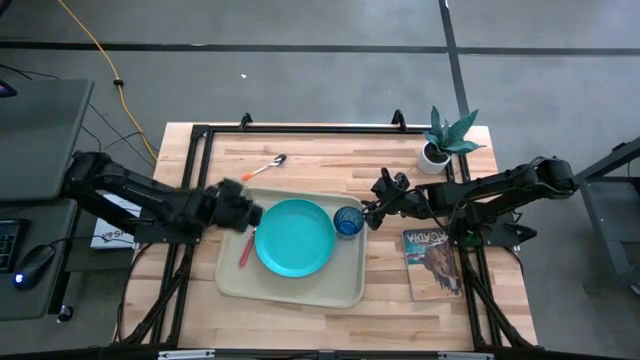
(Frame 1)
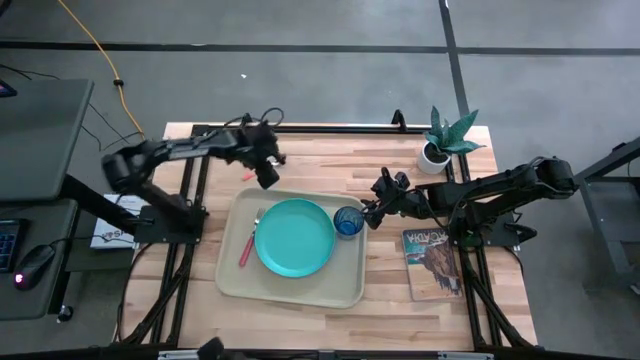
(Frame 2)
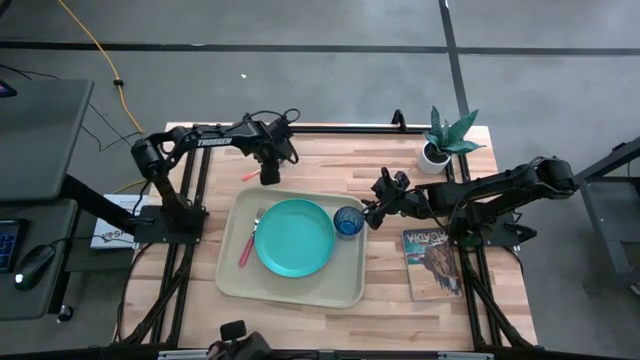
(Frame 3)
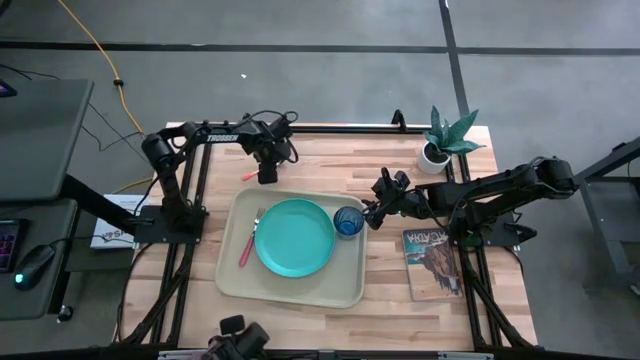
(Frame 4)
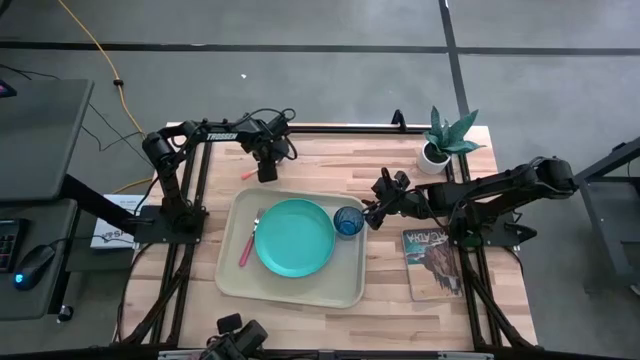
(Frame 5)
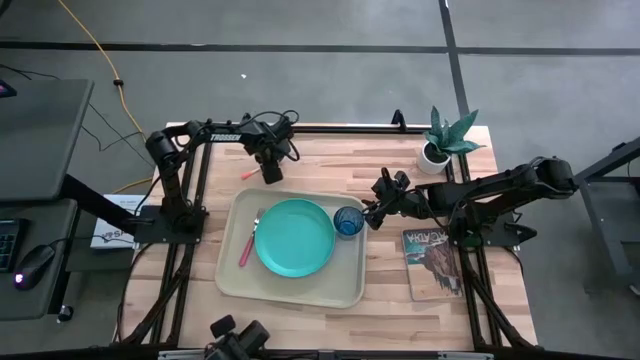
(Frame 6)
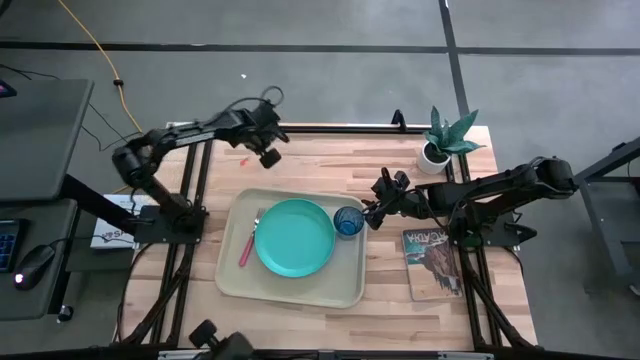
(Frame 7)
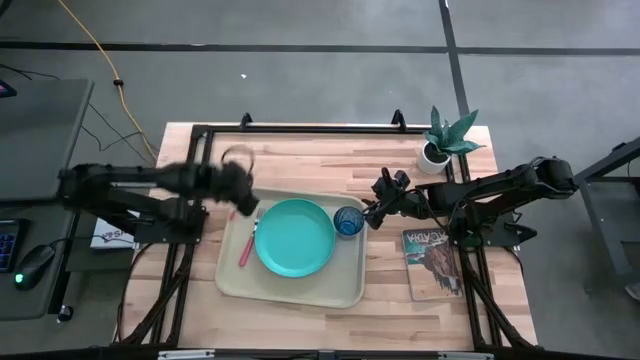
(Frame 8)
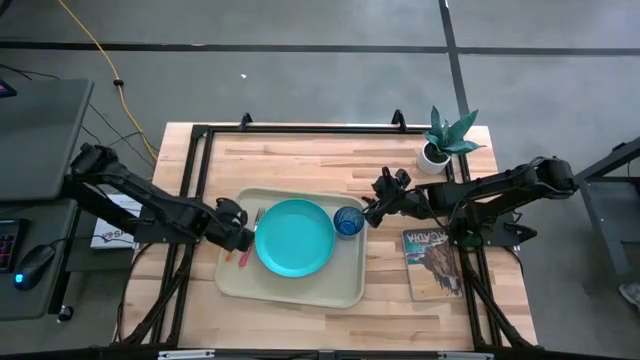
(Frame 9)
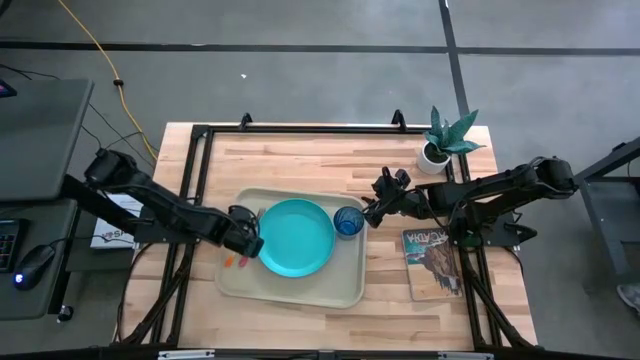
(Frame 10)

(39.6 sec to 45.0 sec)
Task: Pick and place plate/cup/fork/spoon on tray
Put the orange spoon to the left side of the pink fork on the gray serving tray

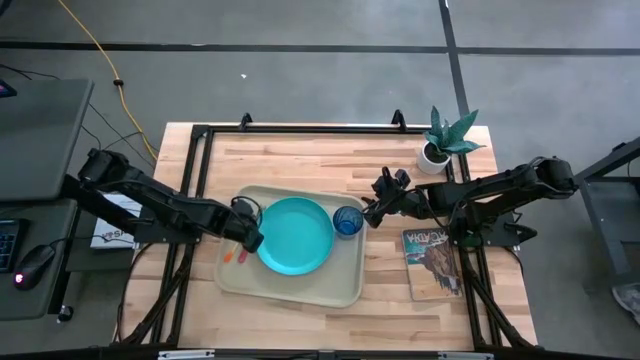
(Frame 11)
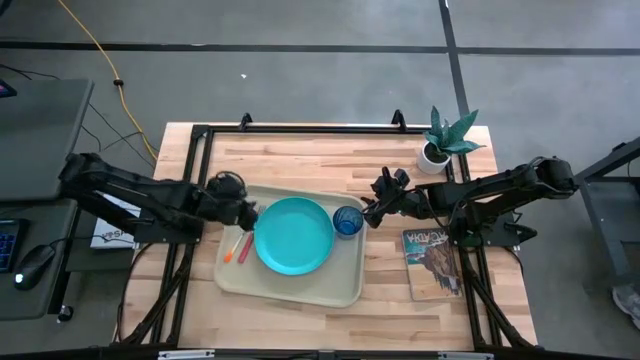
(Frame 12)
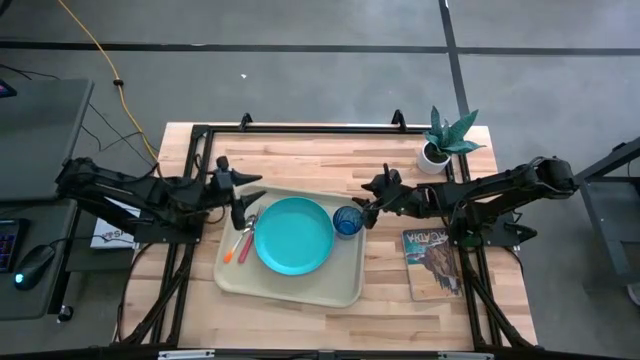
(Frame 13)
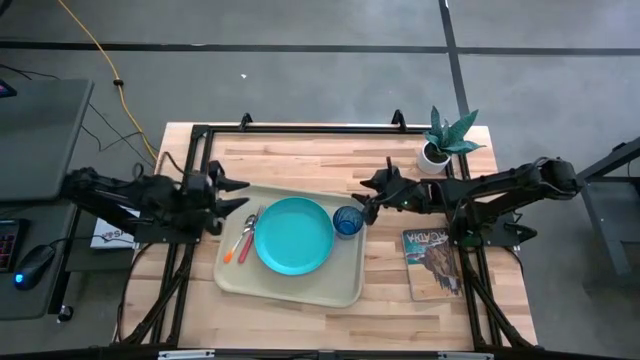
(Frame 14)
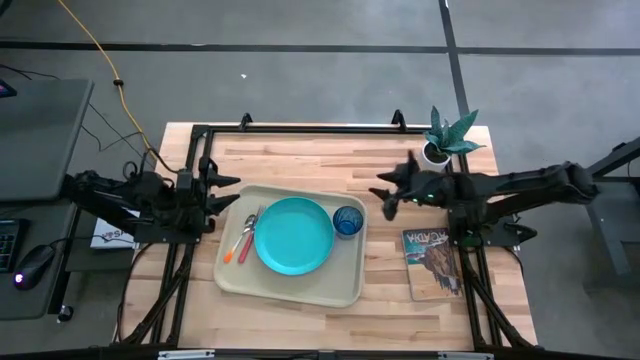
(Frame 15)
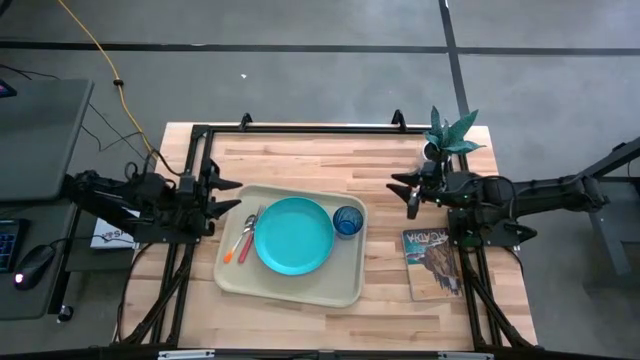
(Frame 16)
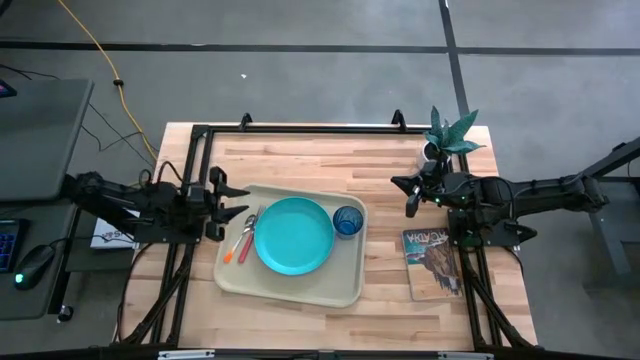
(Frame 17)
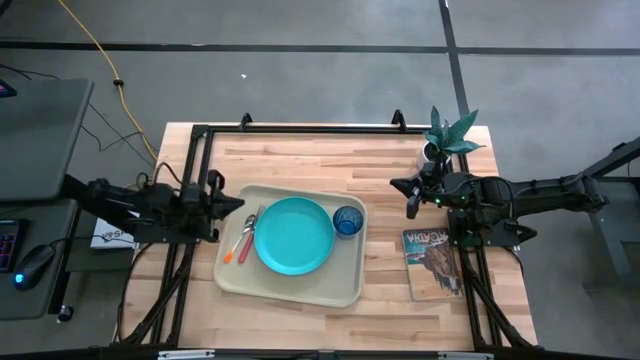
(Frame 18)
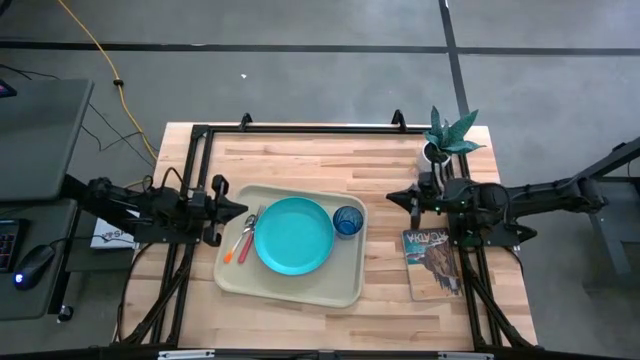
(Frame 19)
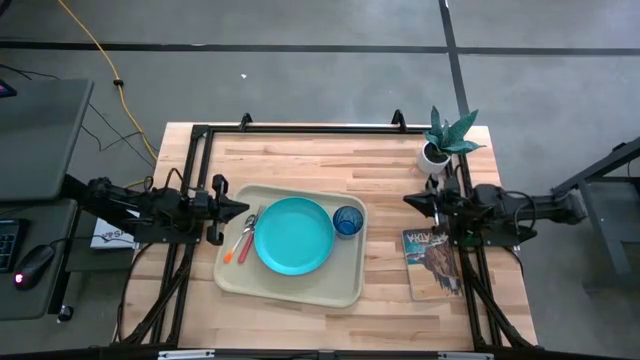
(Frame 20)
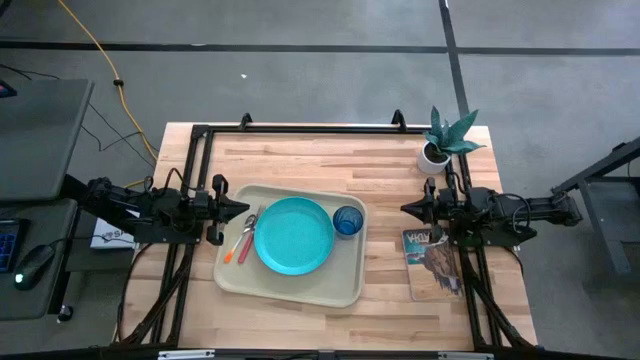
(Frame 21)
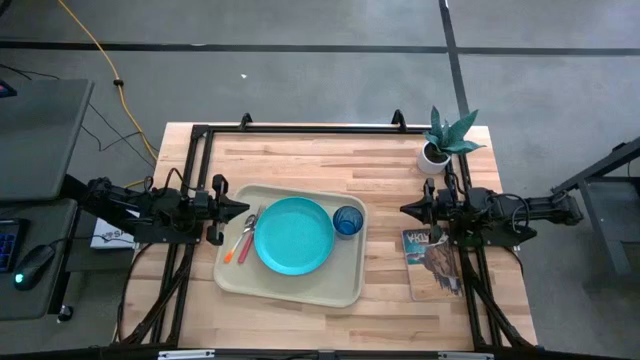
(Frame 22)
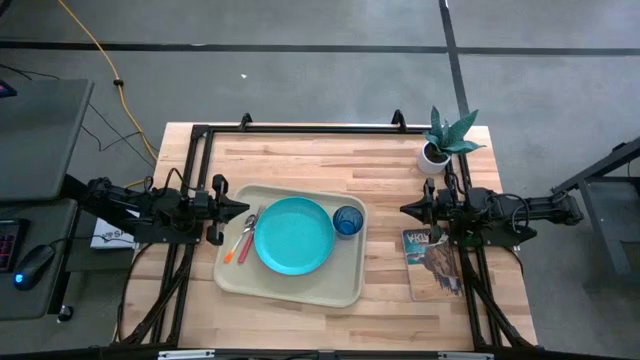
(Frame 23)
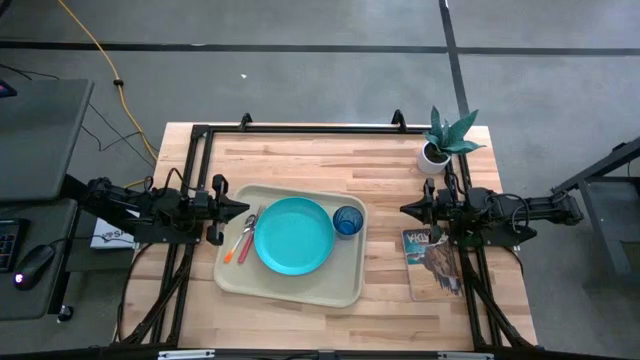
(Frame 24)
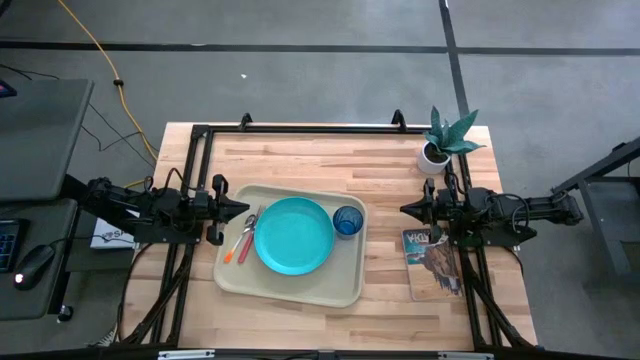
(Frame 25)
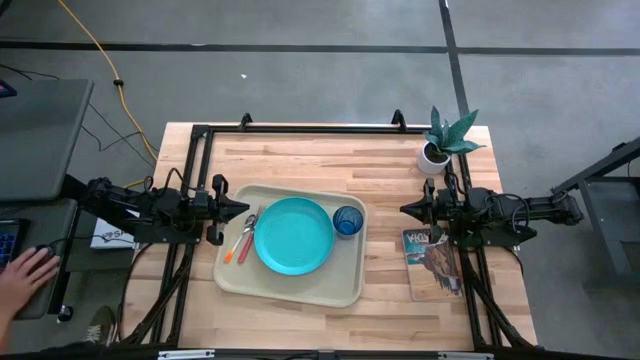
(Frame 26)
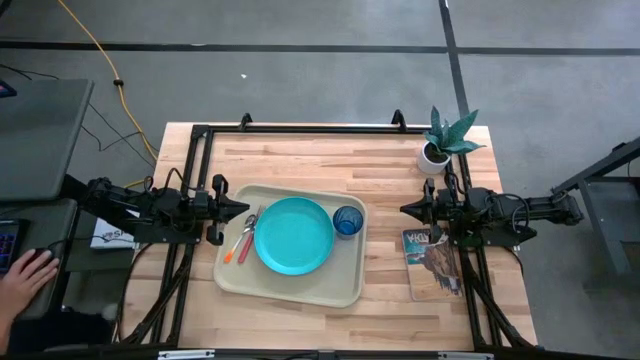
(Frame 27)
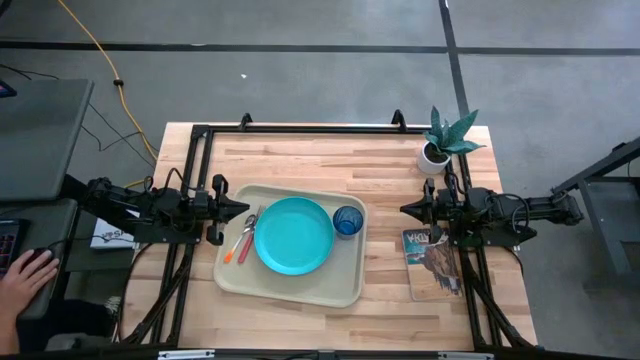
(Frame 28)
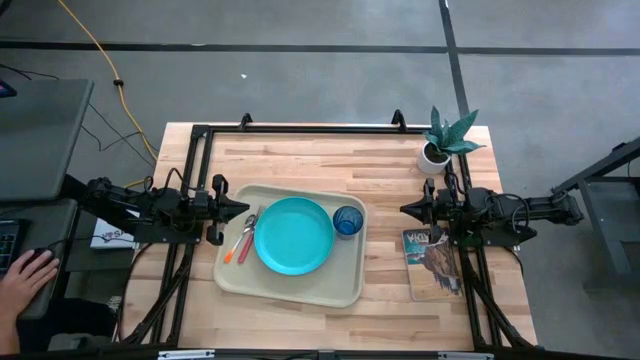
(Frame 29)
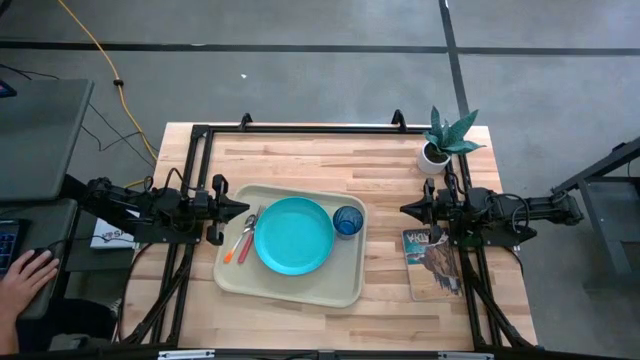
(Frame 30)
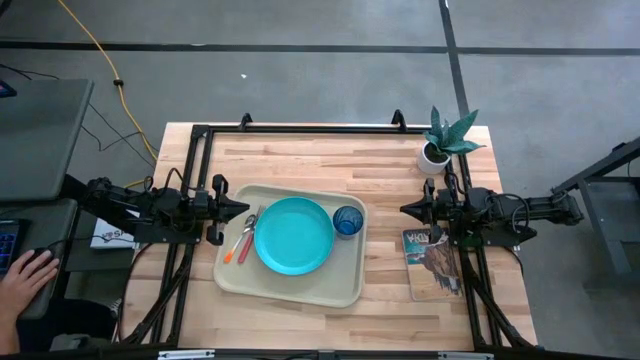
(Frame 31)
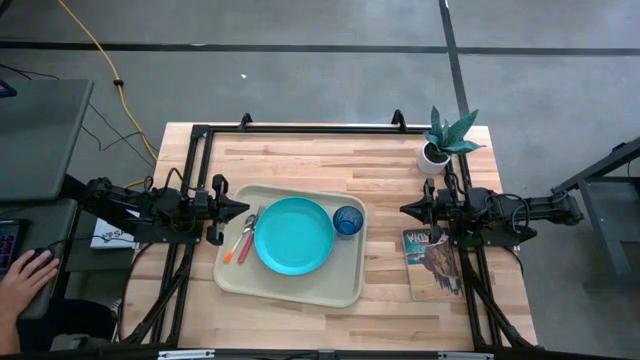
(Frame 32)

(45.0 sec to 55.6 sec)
Return to Home Position

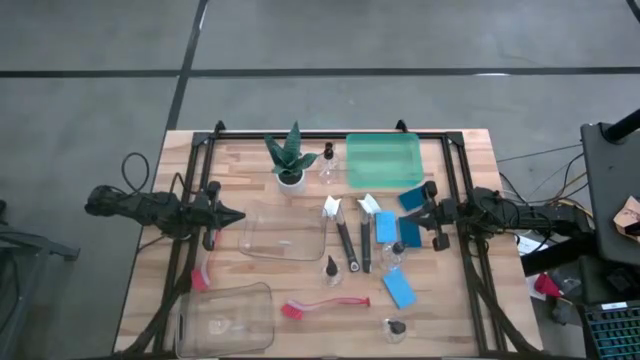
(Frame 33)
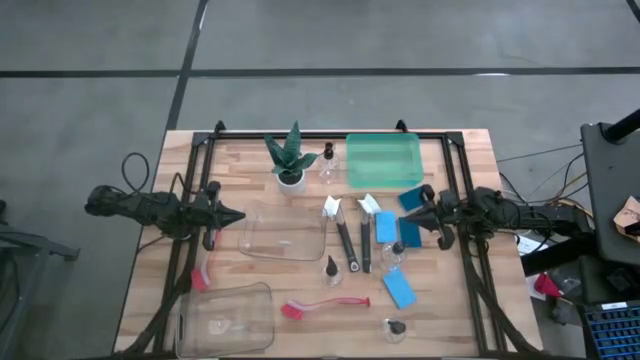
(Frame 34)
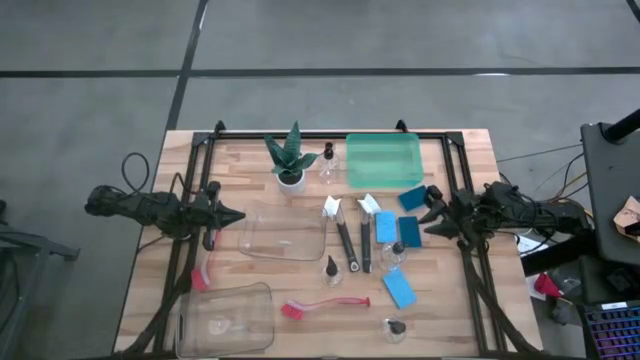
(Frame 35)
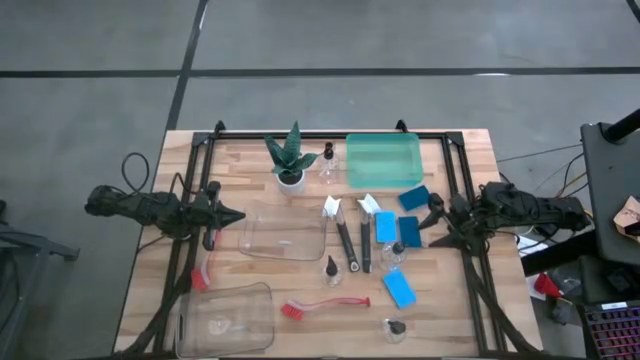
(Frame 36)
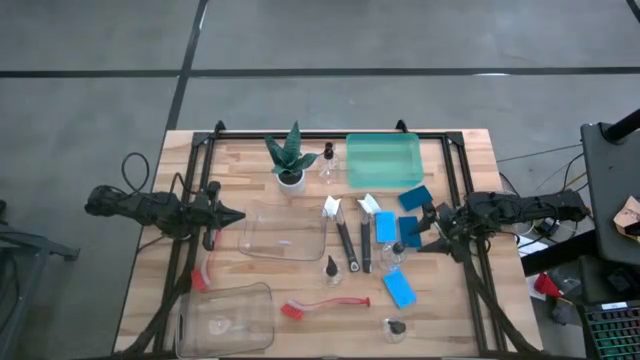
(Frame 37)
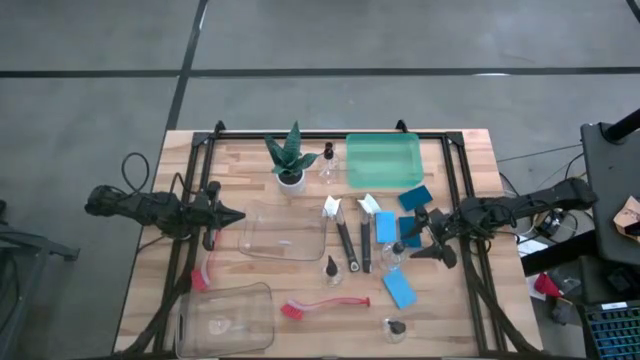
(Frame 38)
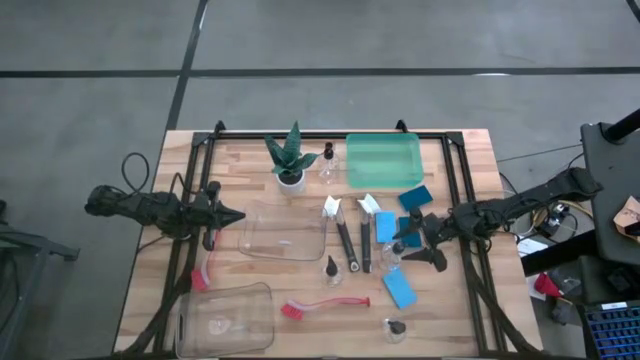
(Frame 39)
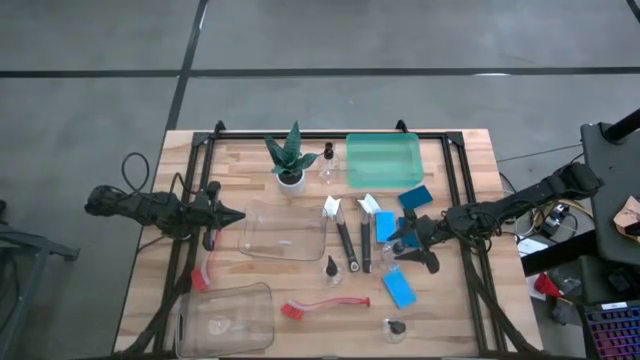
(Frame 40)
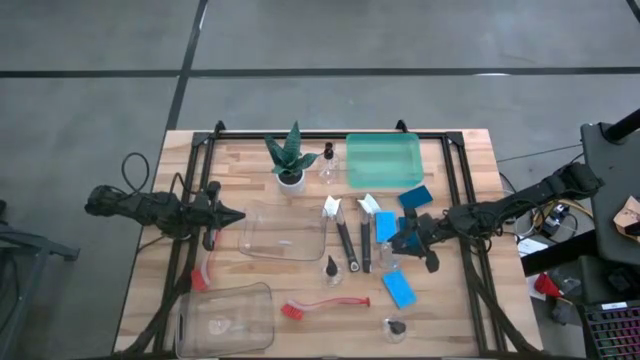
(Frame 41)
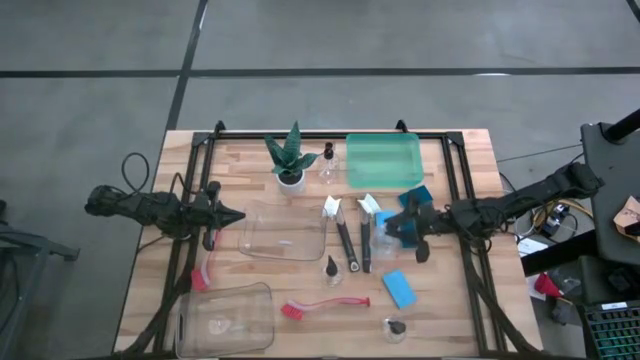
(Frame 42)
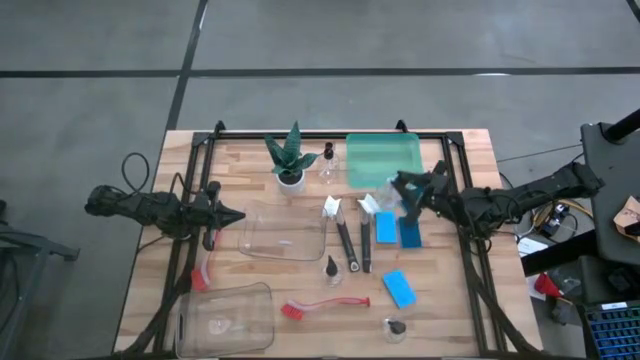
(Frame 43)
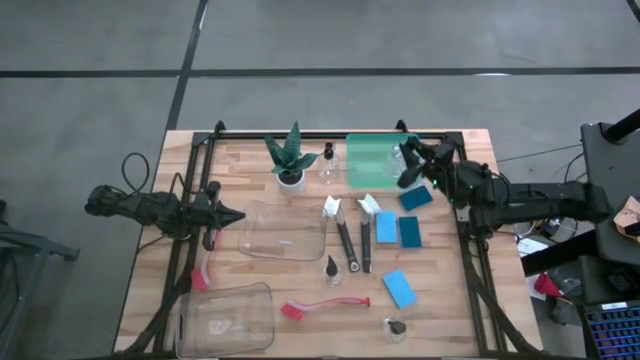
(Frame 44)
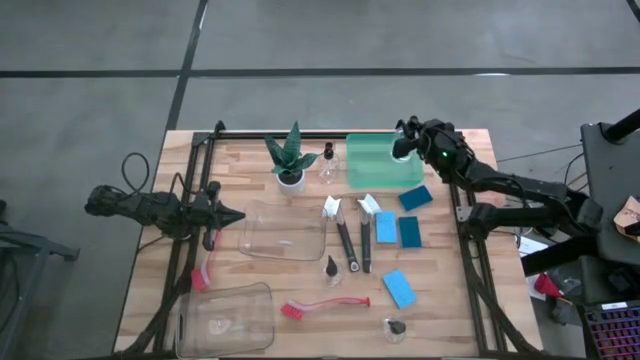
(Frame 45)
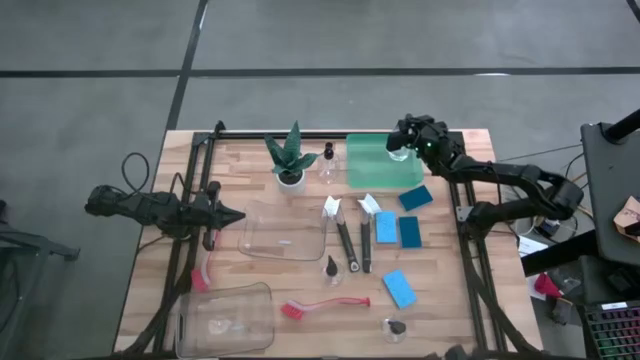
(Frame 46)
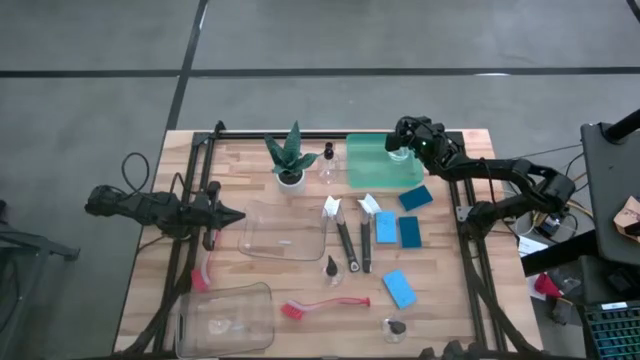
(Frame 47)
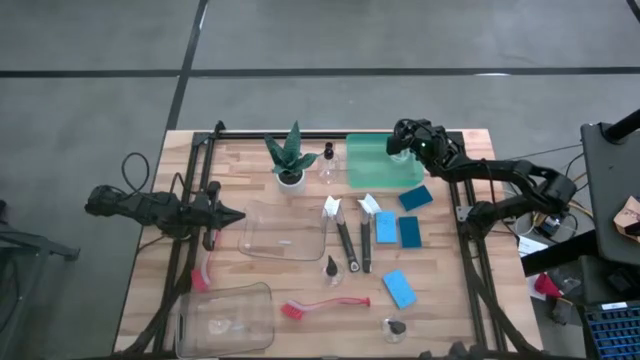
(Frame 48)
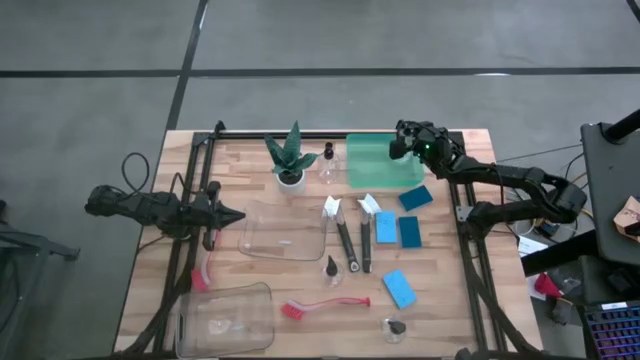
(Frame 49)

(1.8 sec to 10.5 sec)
Task: Pick & Place Kitchen Sink Supplies
Put the transparent soap dispenser into the blue bin
